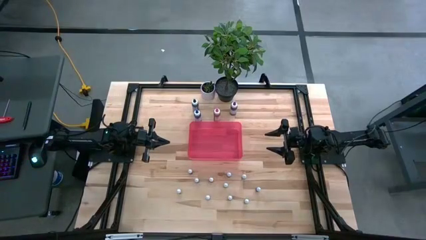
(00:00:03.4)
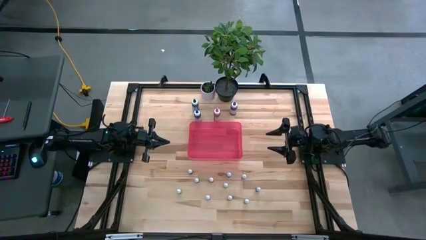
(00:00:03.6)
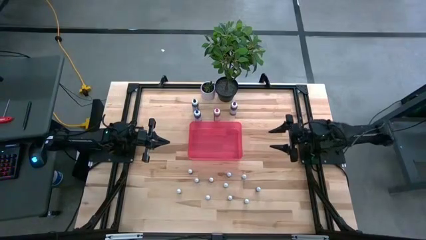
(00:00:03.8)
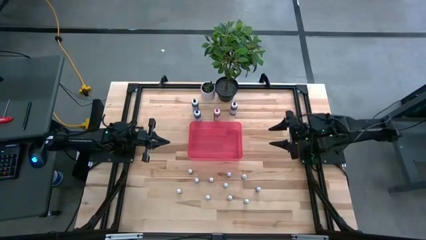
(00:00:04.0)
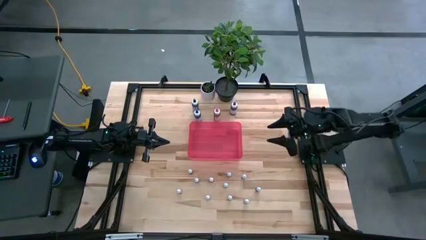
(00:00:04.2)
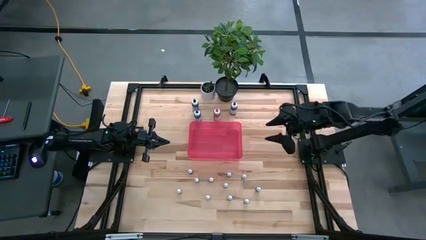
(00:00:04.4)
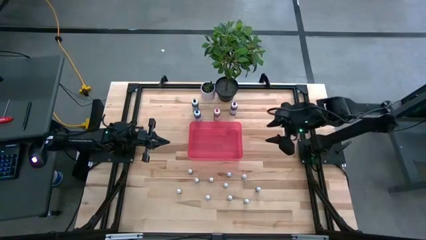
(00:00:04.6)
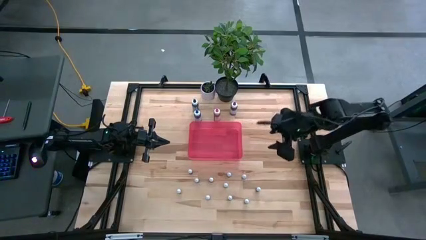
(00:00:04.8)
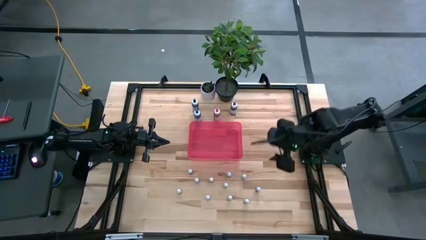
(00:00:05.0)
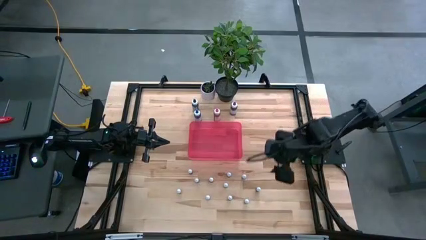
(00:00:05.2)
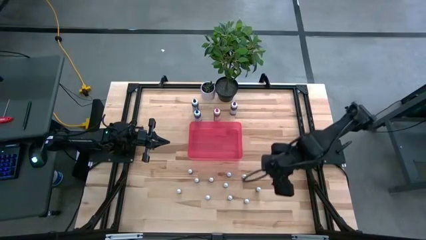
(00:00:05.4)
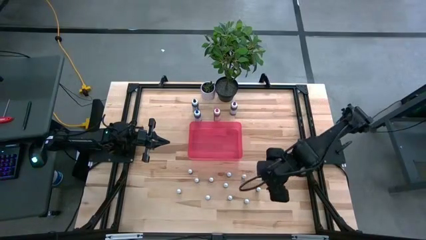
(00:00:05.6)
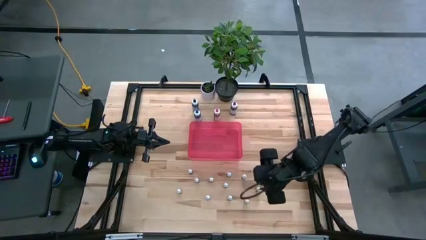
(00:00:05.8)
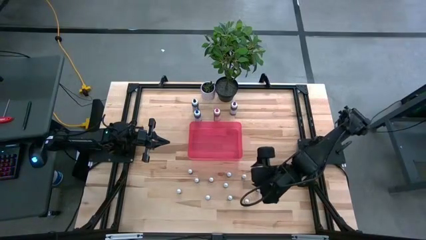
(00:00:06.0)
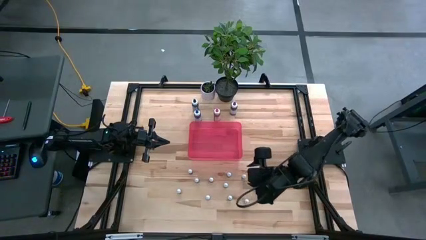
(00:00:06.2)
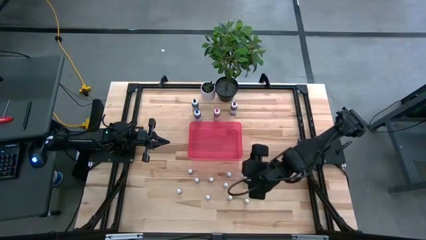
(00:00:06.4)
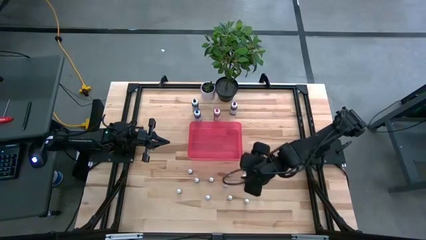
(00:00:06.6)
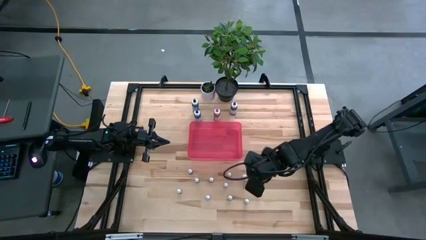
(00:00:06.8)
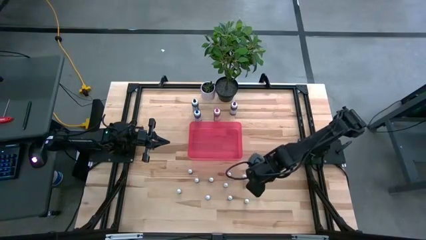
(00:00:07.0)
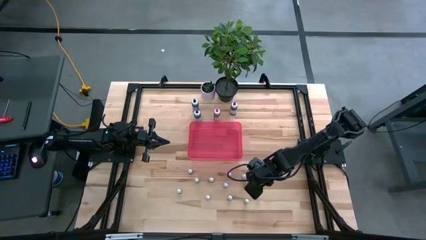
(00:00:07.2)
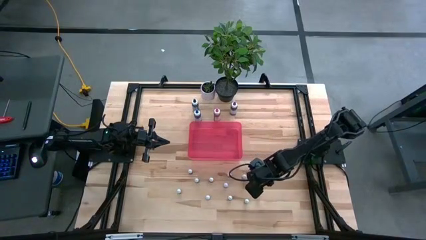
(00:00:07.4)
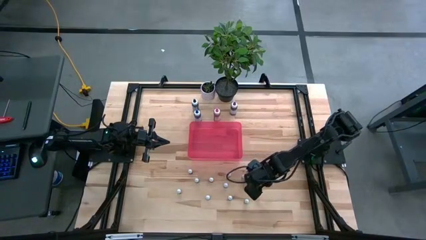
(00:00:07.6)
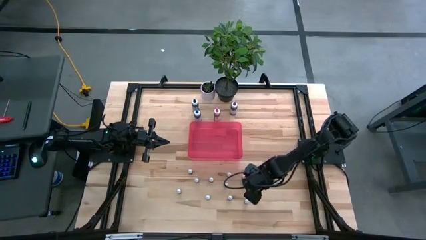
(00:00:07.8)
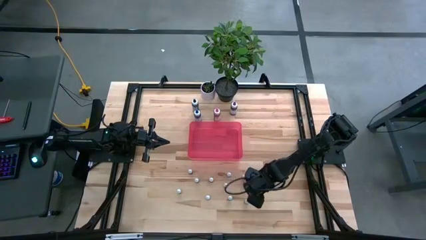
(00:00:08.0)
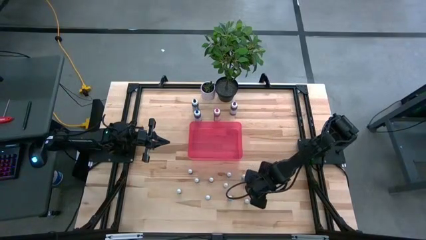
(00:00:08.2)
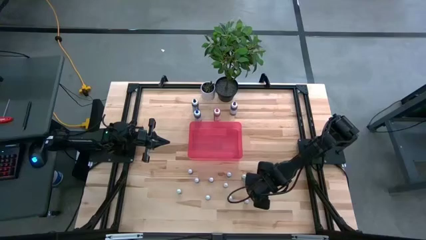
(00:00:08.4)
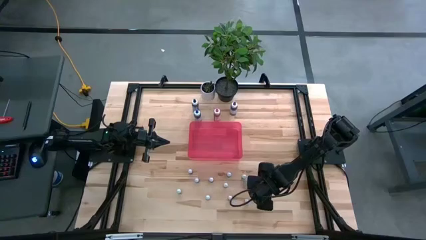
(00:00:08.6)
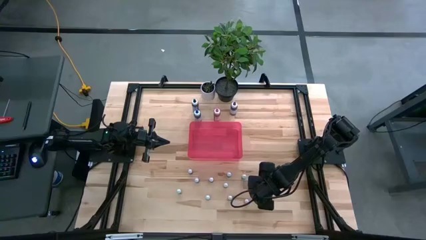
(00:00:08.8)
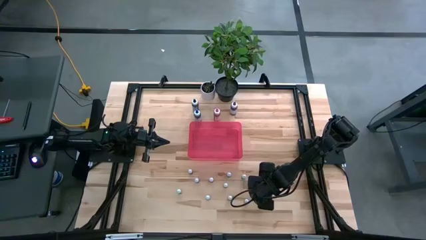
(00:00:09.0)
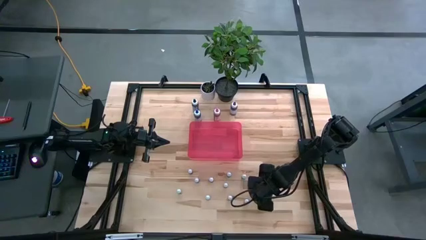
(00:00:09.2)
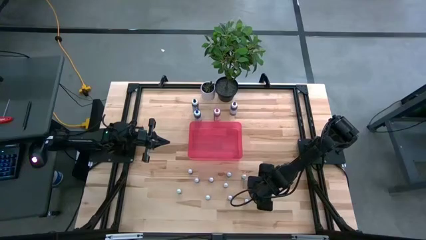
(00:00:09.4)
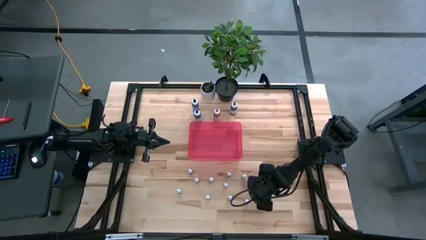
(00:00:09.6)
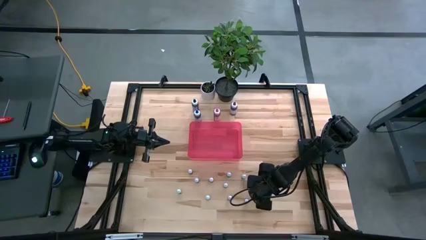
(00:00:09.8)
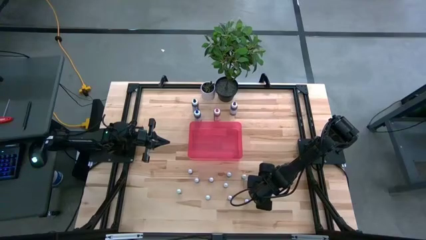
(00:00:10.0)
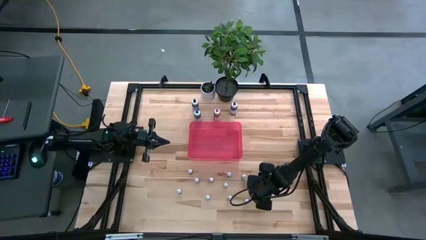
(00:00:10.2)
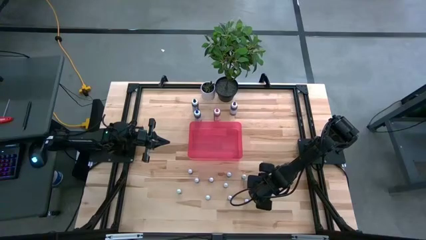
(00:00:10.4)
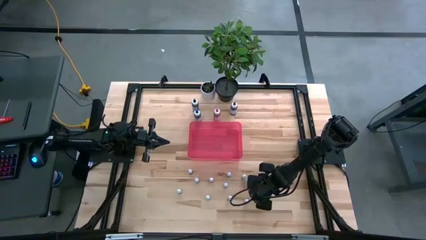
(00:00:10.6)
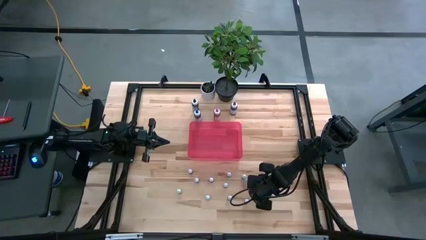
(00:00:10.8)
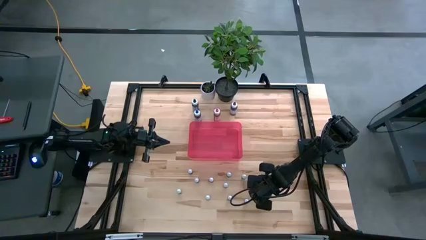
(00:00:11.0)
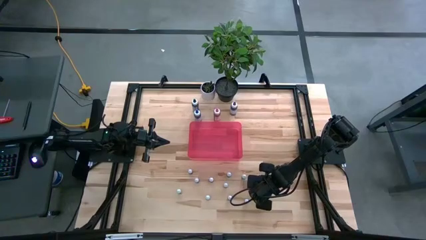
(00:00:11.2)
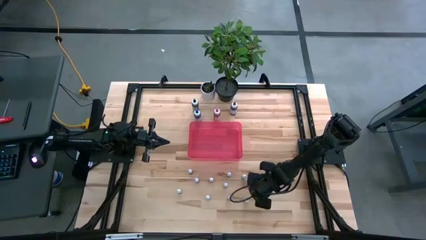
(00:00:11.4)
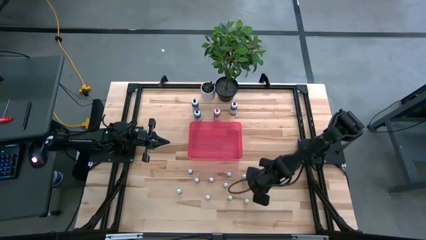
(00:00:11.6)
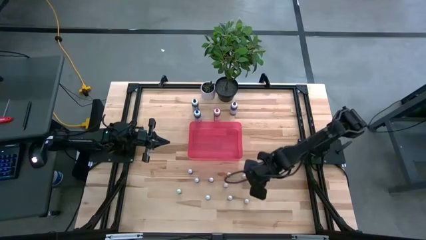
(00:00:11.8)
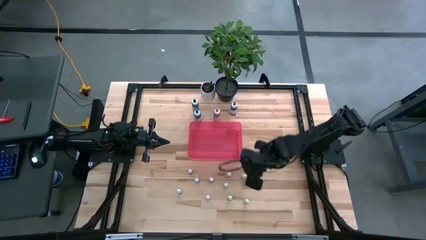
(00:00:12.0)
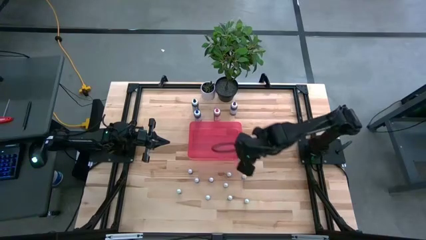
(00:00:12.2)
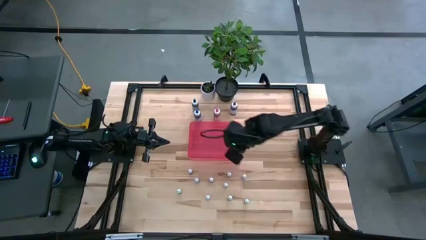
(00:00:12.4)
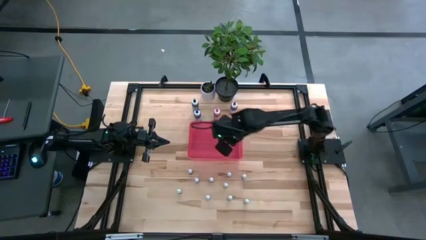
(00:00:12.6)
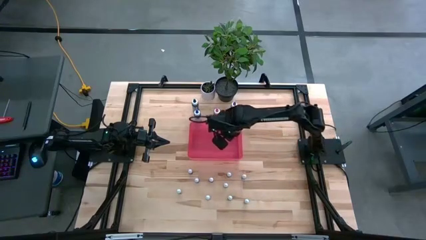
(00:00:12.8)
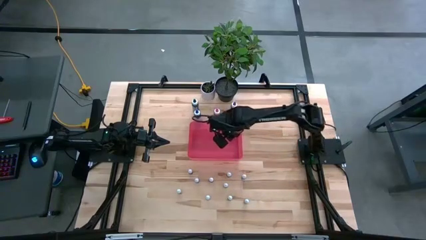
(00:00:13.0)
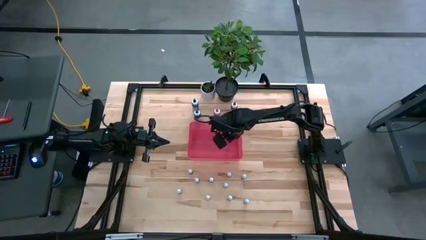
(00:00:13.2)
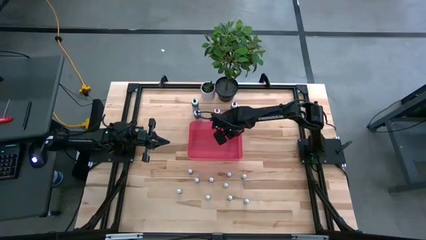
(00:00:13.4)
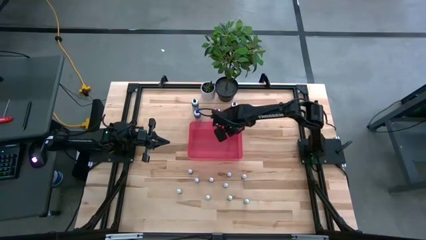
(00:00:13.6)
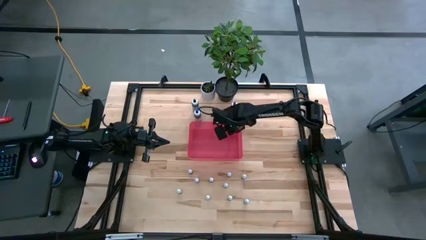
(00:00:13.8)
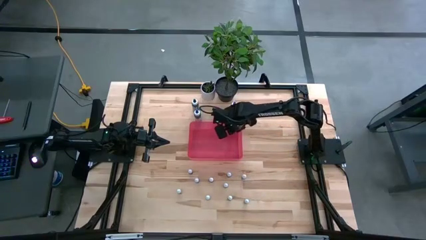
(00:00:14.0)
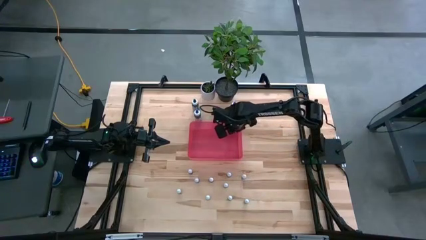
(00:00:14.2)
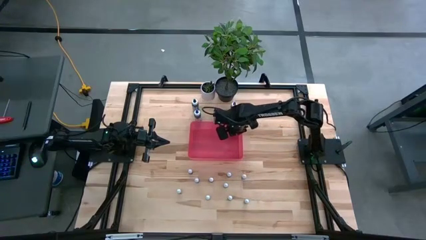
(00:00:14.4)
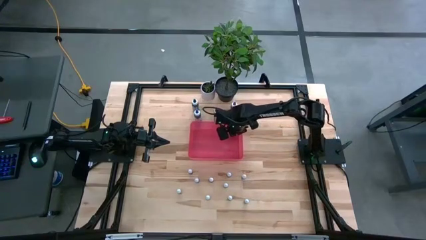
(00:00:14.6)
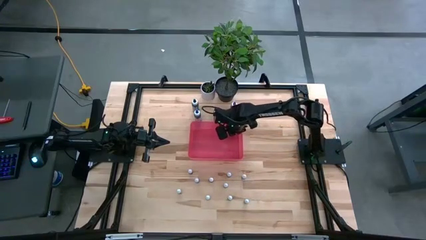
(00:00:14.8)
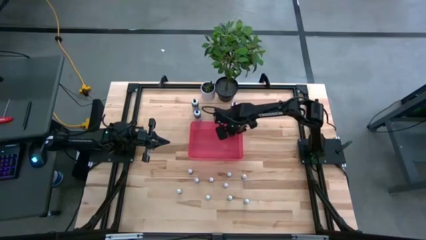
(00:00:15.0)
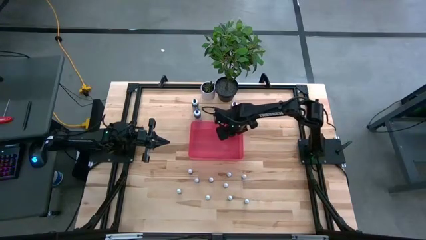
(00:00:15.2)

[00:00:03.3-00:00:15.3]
Task: Pick & Place food coloring
Put the small black food coloring bottle into the pink container
